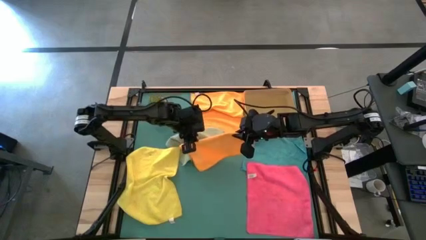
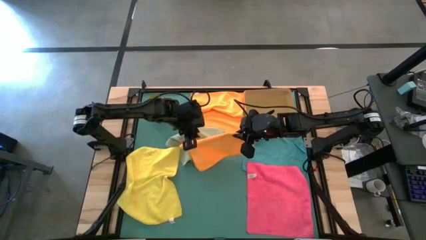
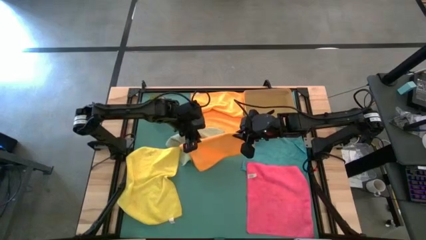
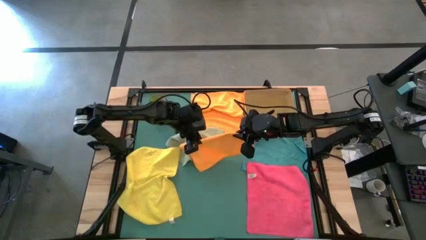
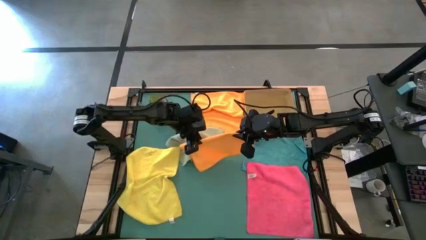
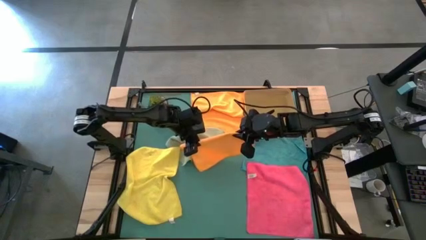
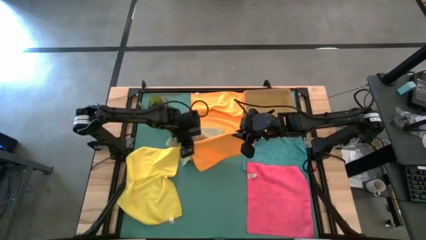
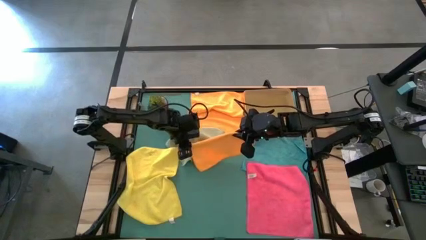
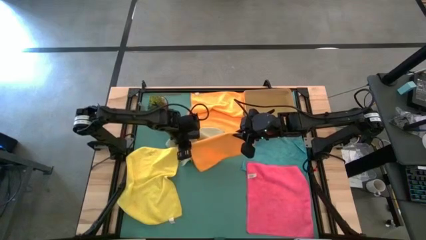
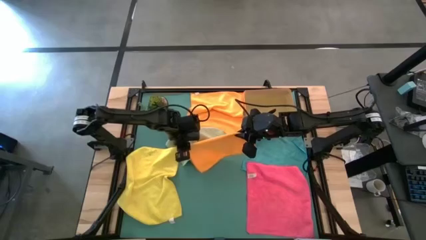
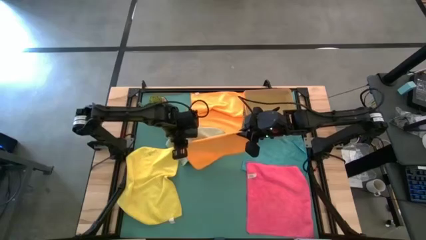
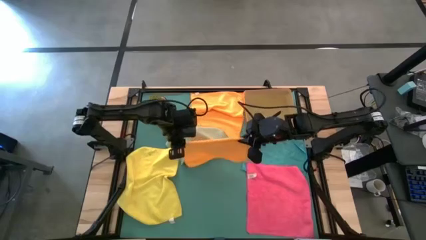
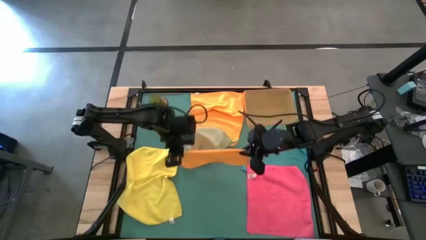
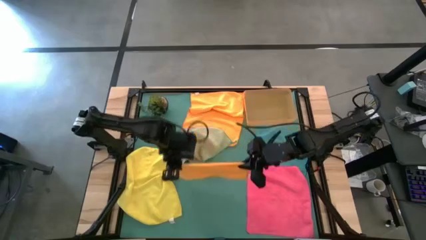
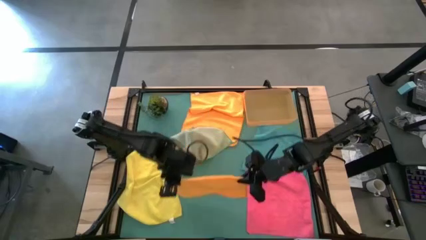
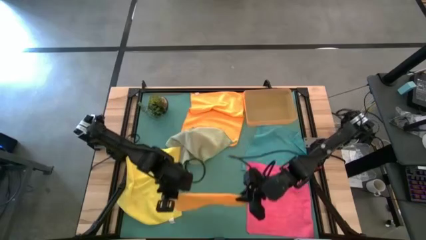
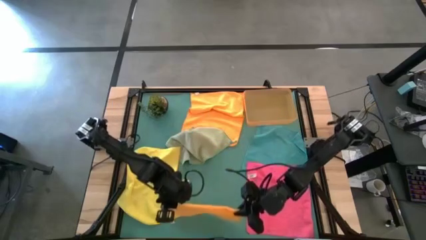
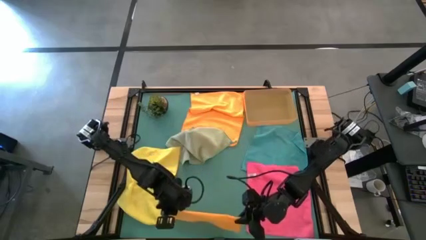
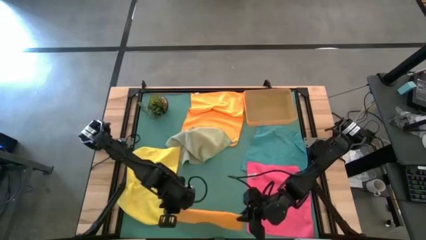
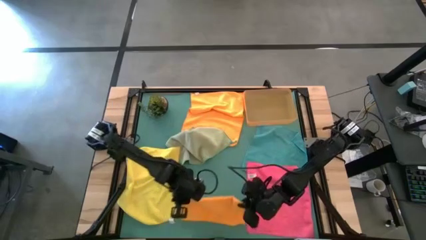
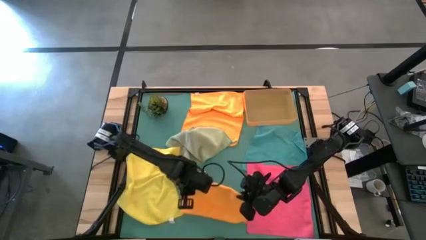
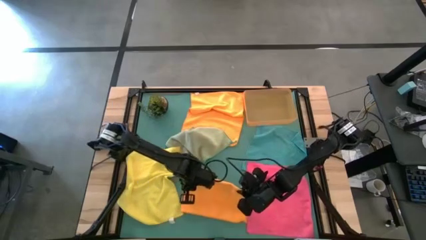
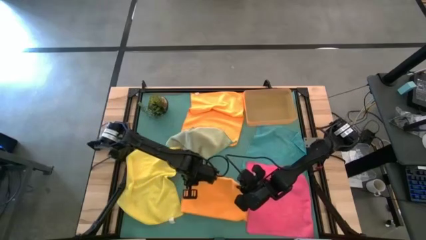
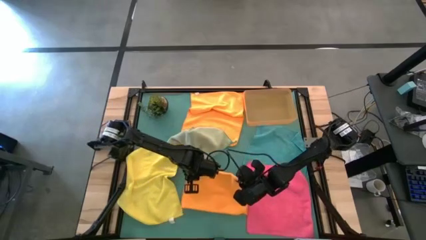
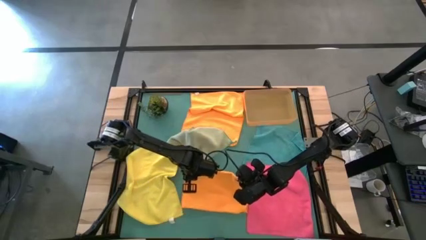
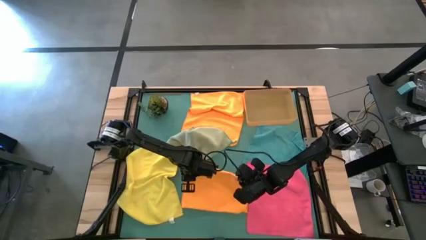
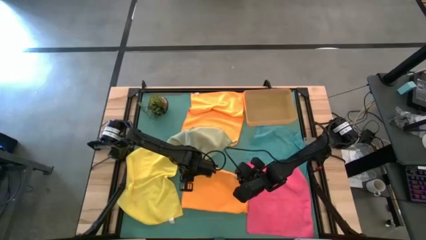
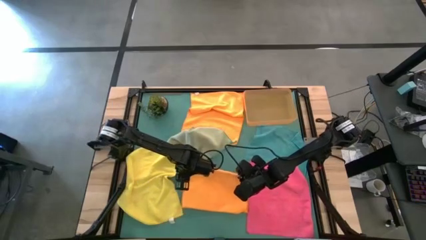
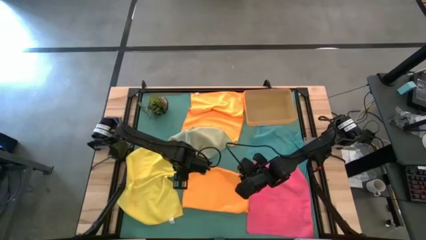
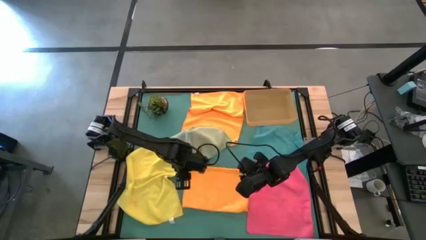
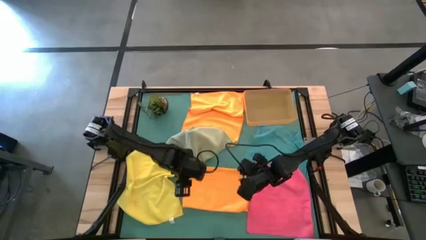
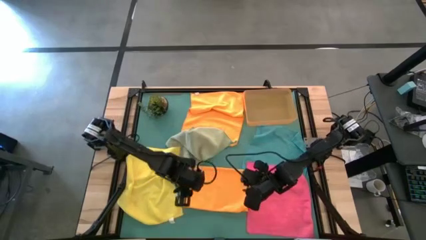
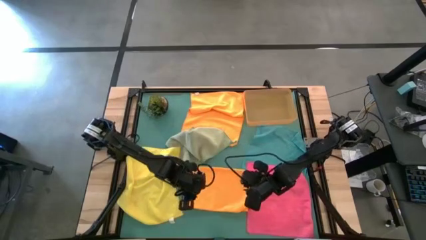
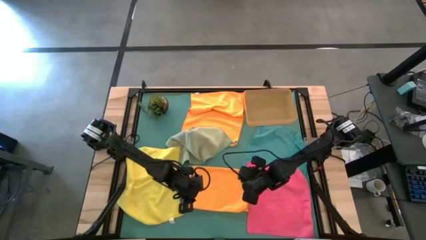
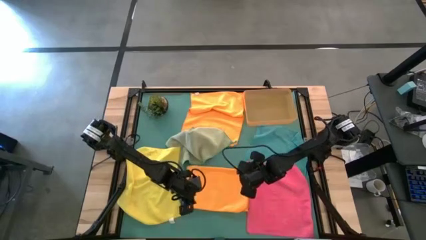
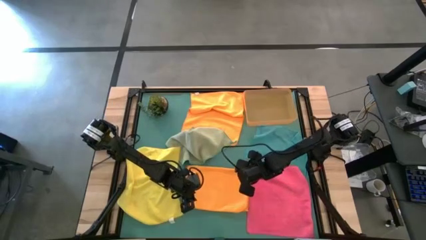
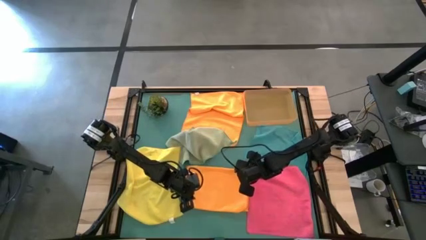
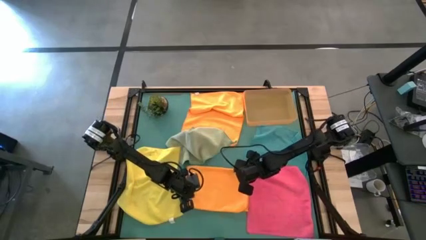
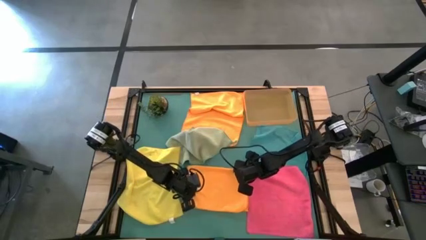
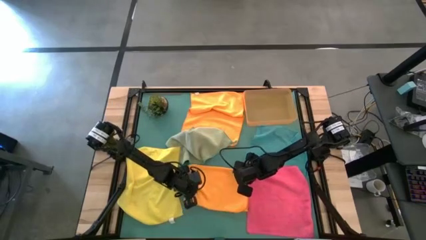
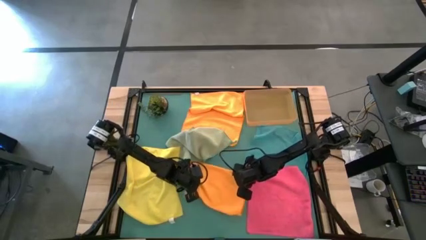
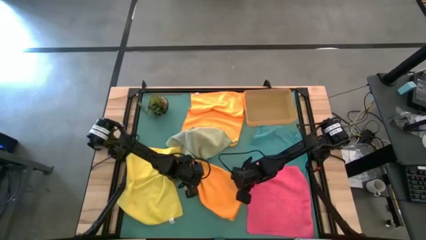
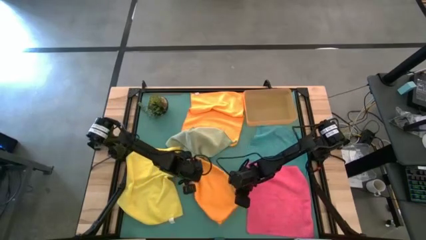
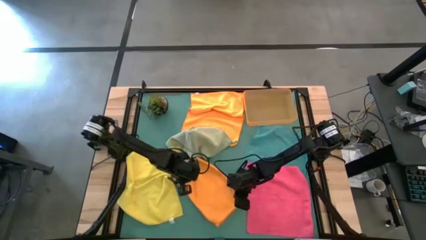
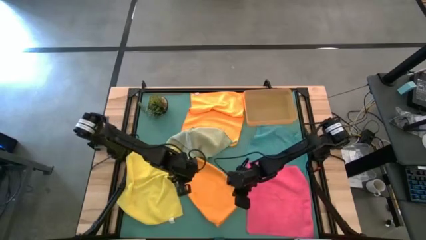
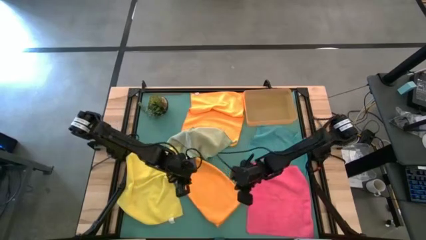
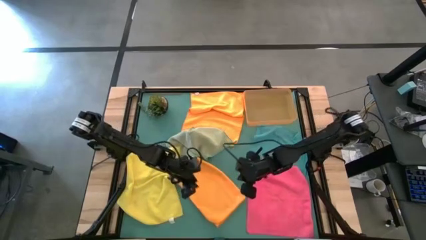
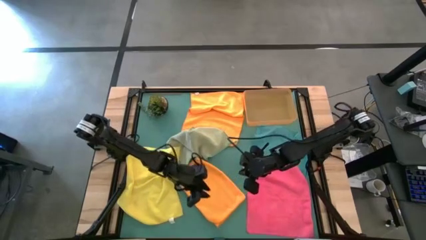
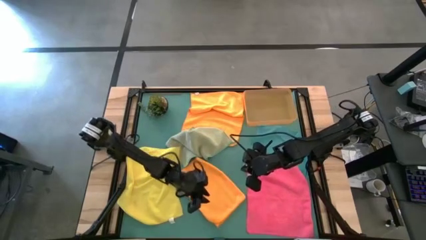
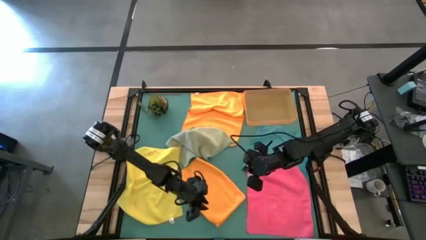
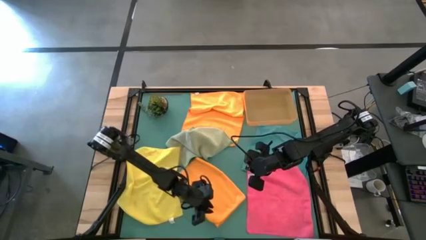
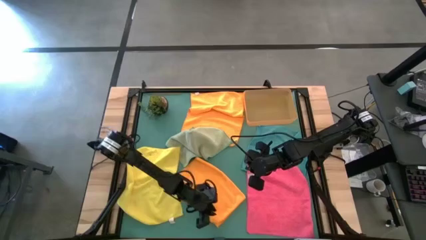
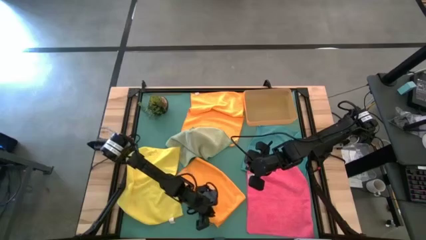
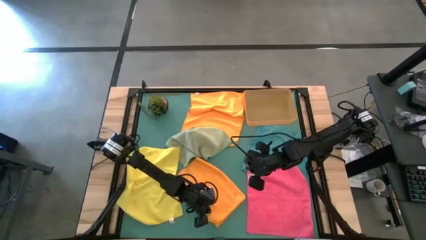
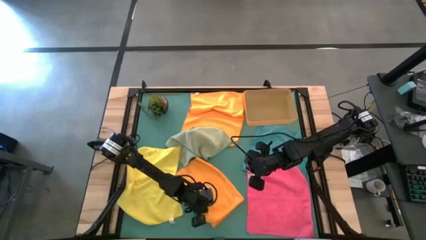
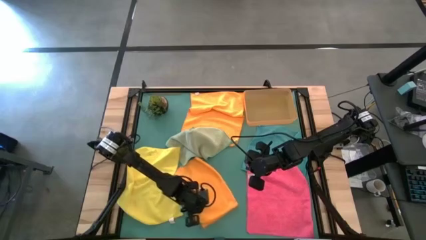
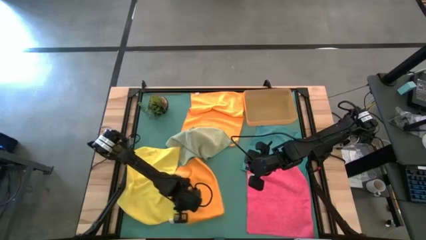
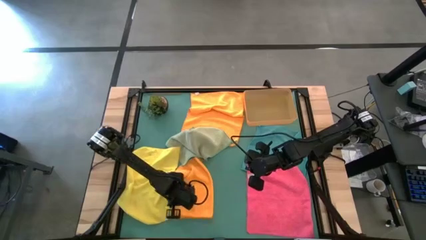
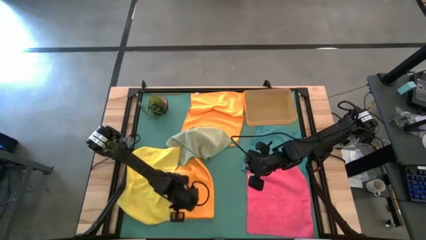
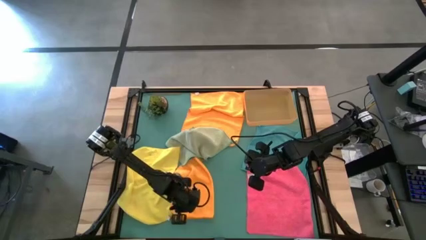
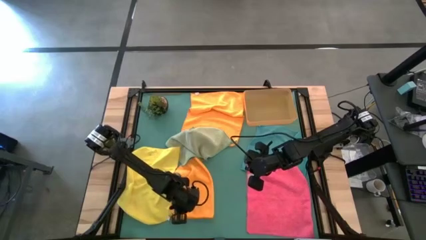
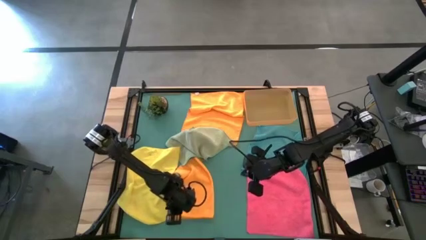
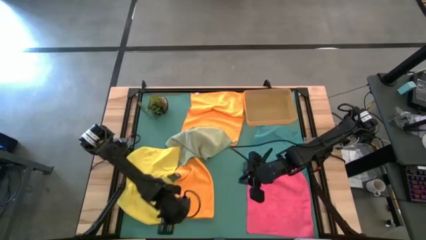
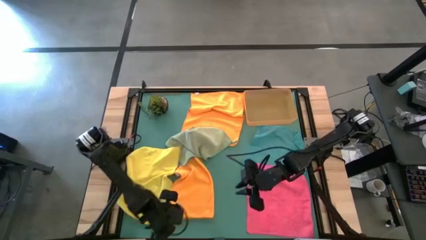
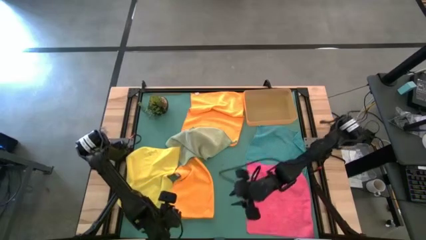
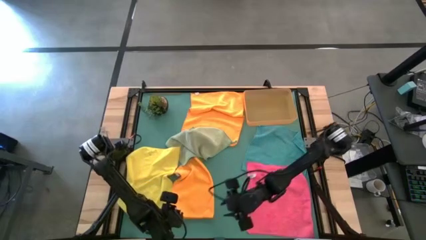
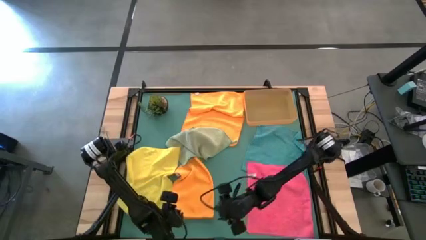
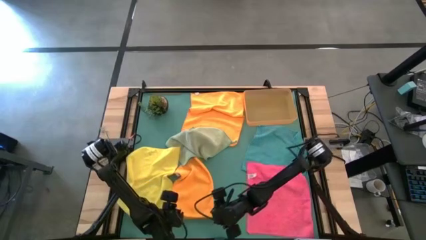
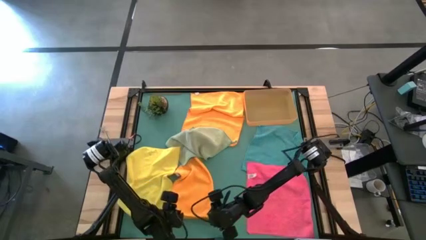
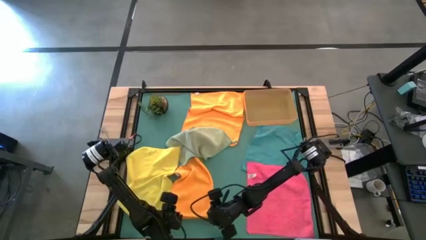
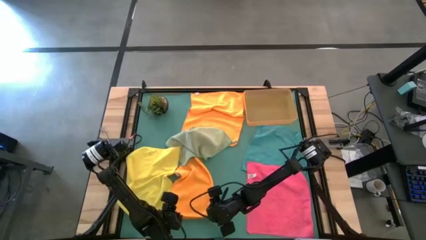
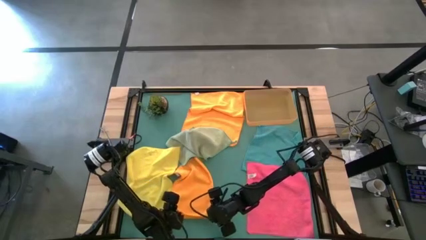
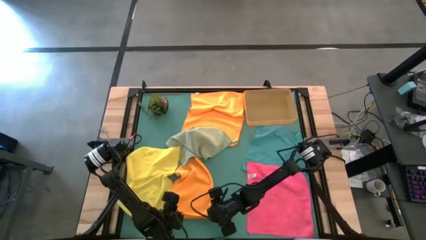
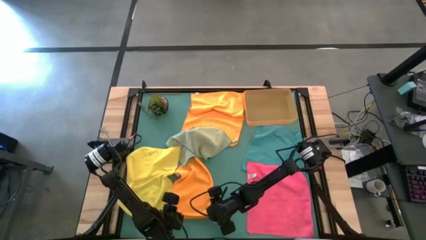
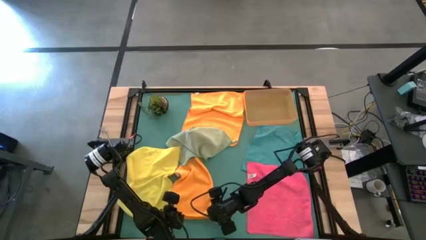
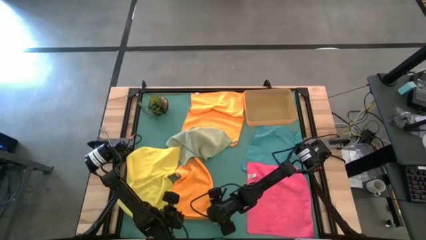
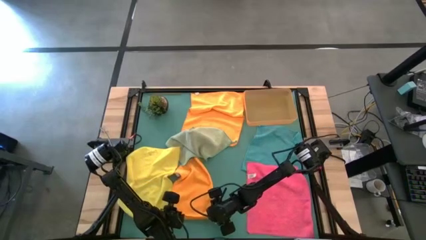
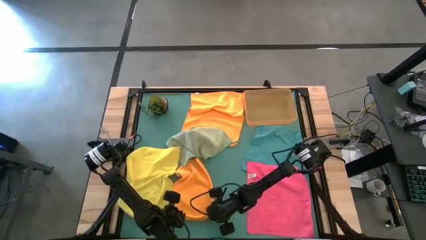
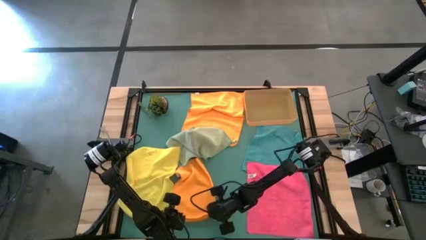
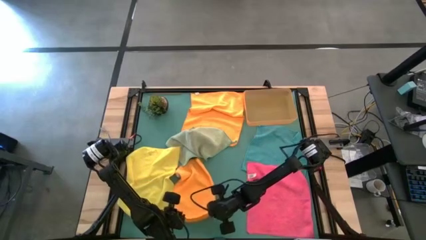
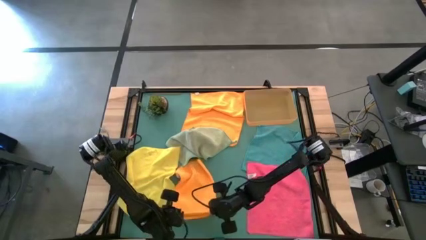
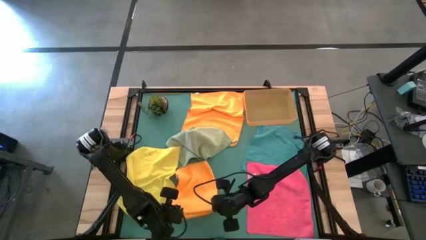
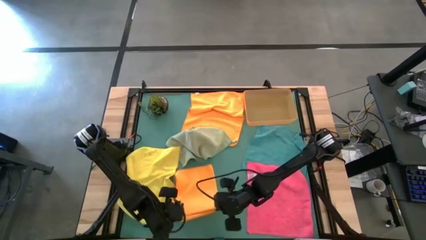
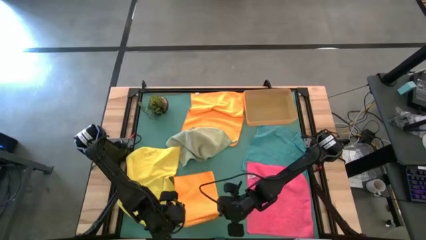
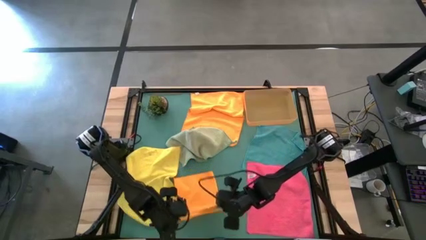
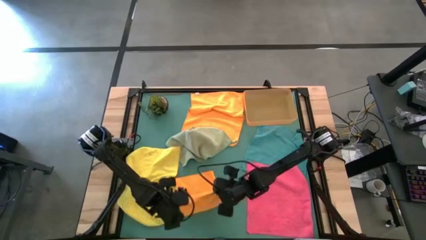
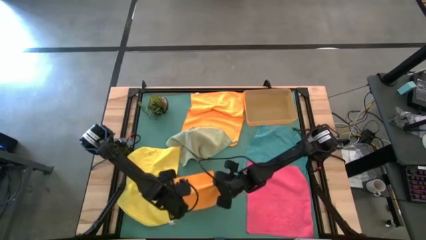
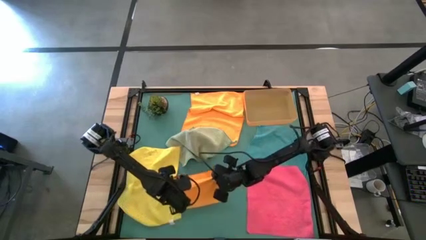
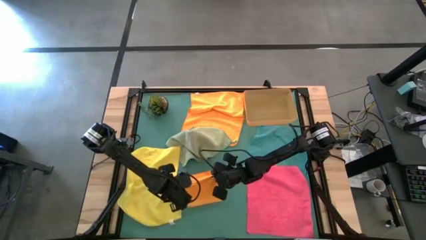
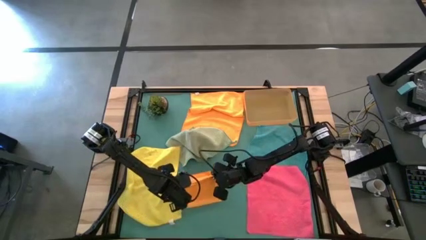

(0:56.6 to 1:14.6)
Task: Fold microfiber towels
Fold the bottom orange towel
